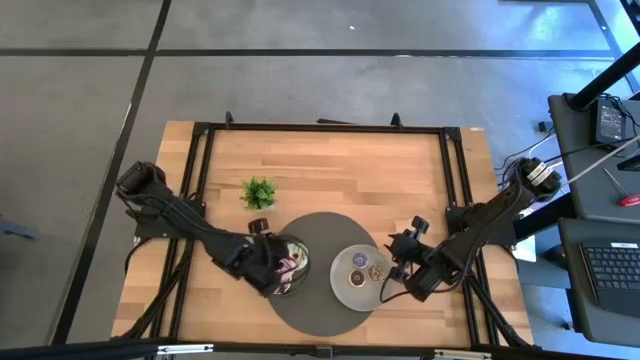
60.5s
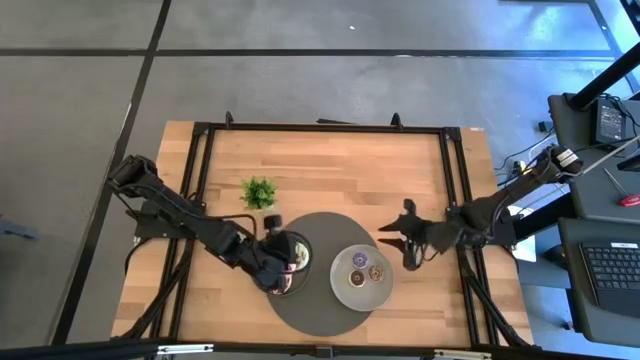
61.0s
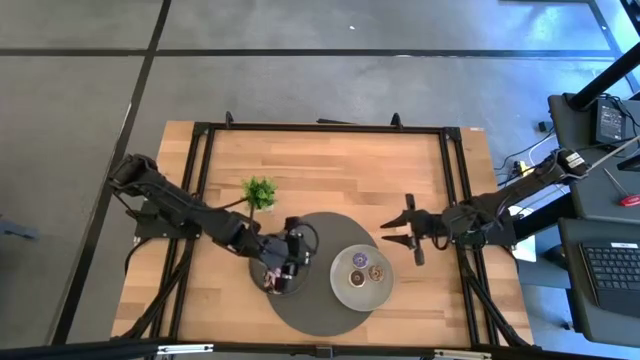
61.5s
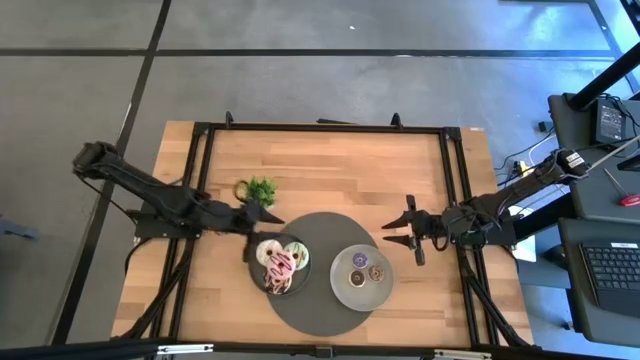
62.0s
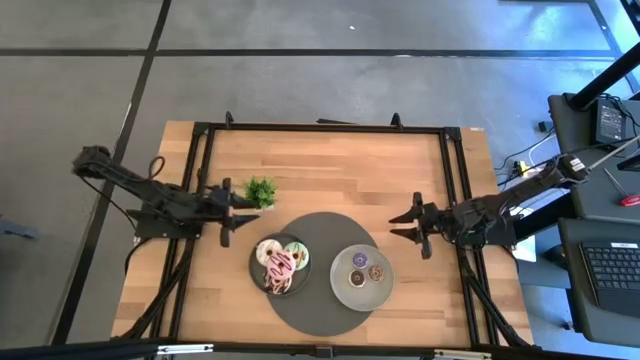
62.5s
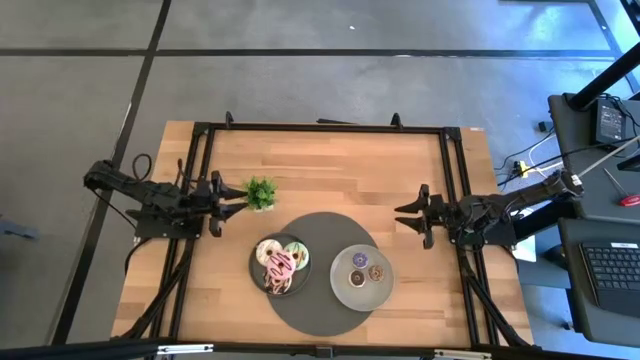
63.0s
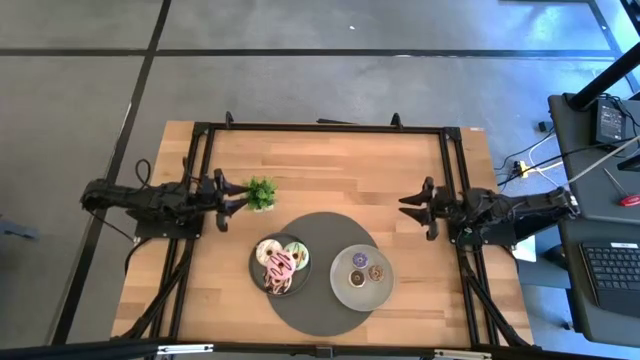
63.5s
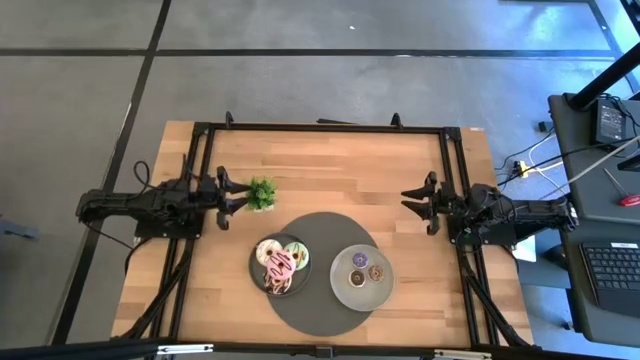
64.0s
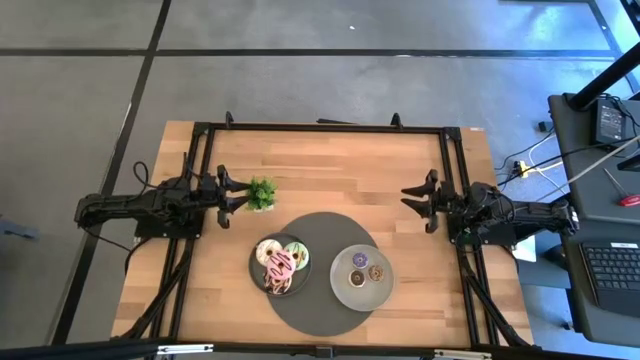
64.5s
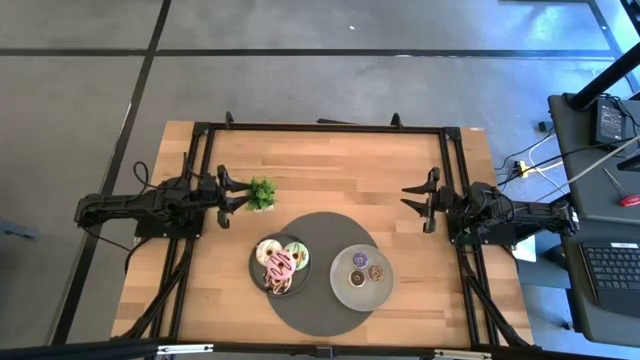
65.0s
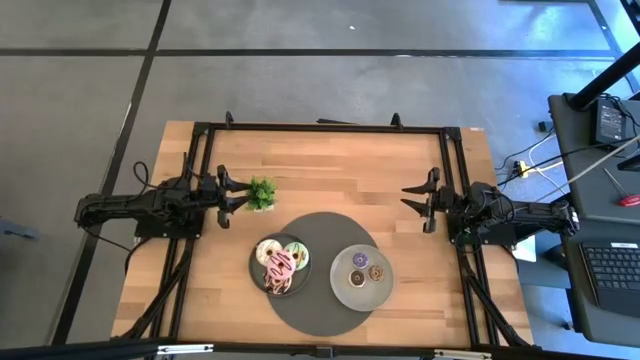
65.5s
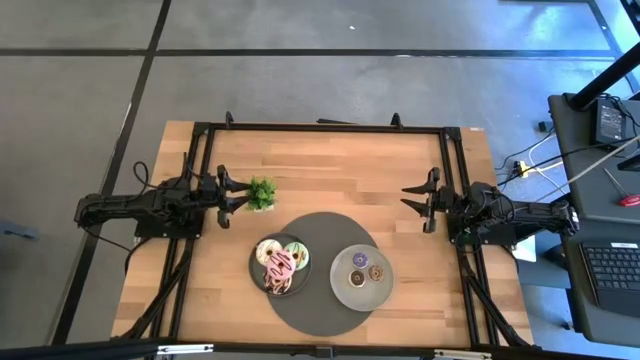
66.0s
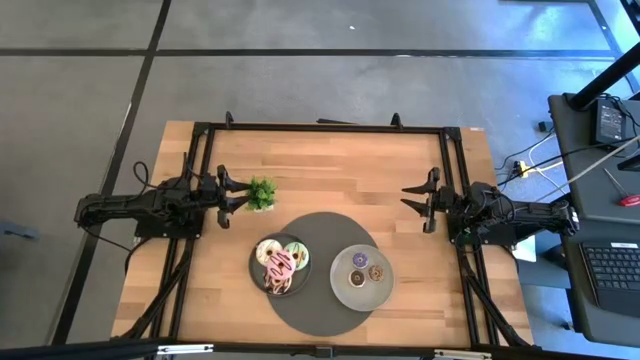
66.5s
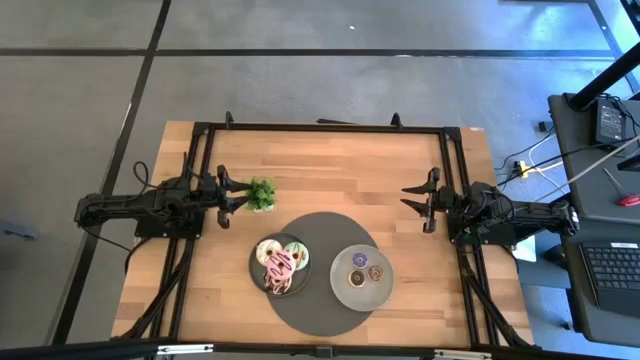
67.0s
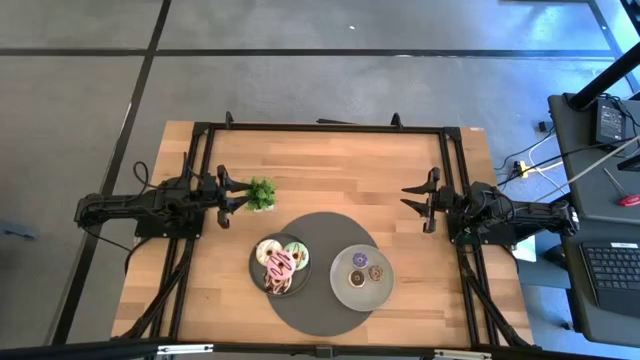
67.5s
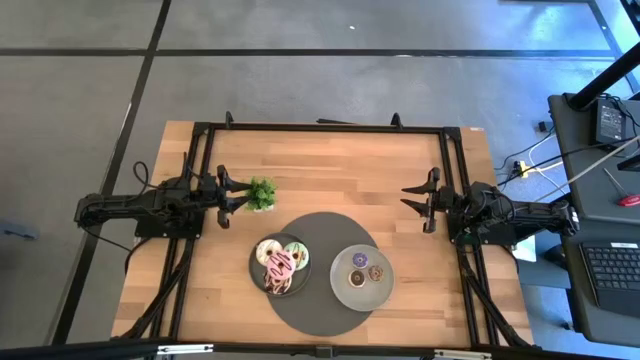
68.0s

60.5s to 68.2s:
Task: Pick & Place donuts
Return to Home Position

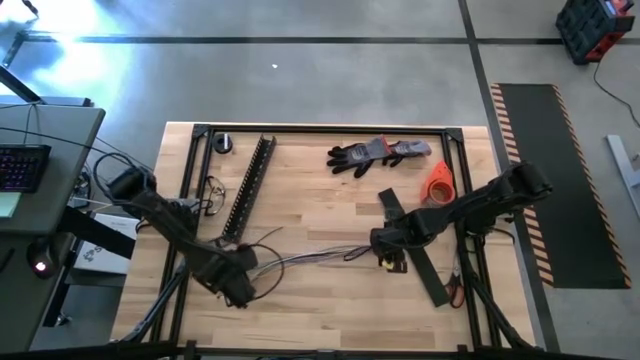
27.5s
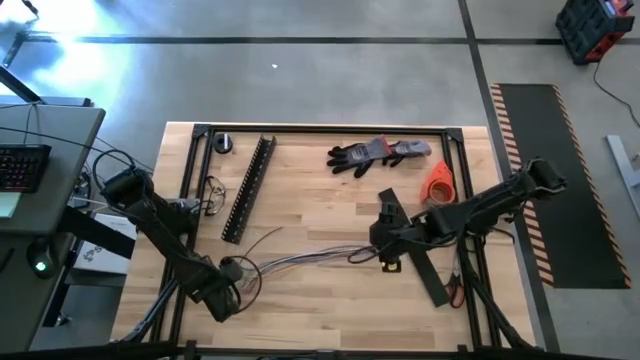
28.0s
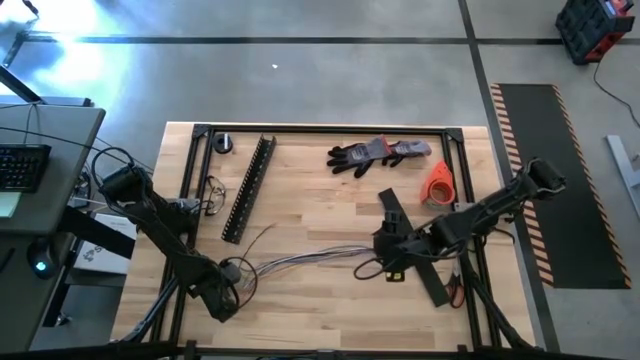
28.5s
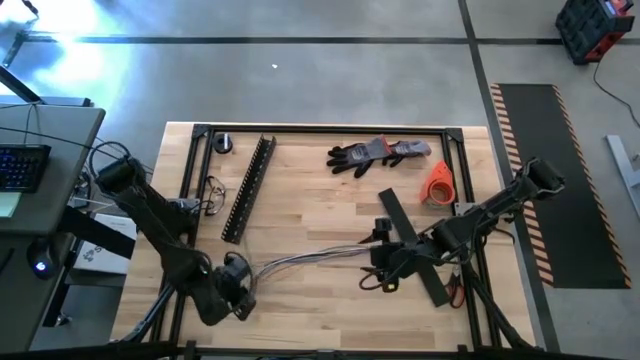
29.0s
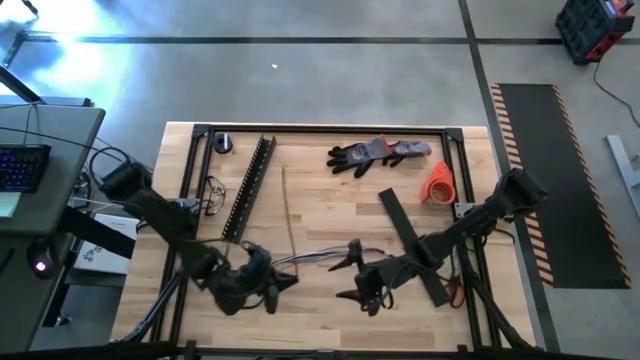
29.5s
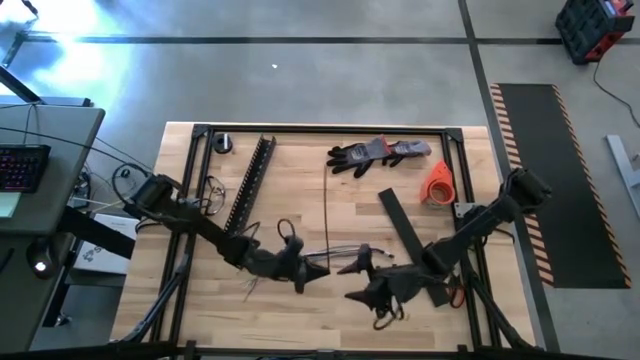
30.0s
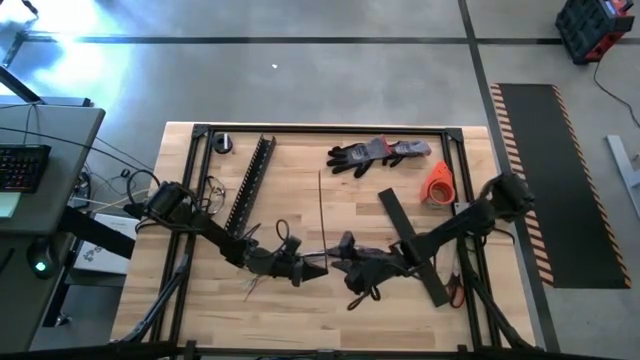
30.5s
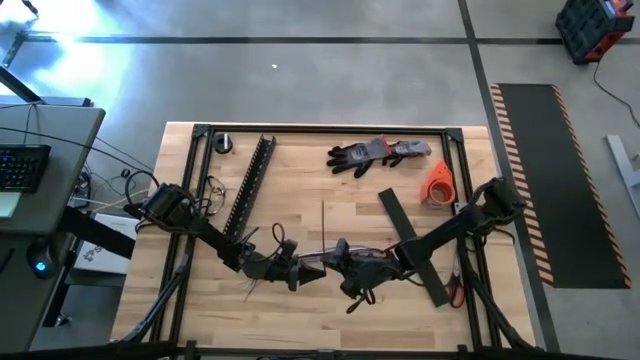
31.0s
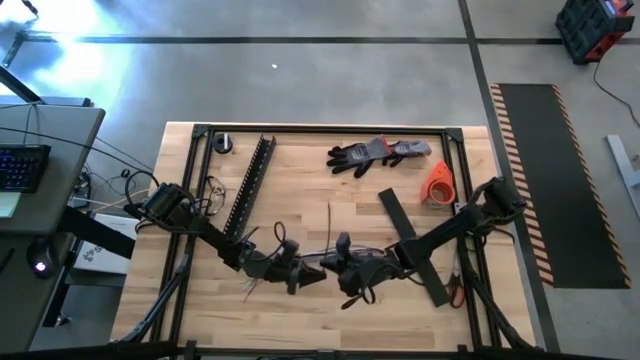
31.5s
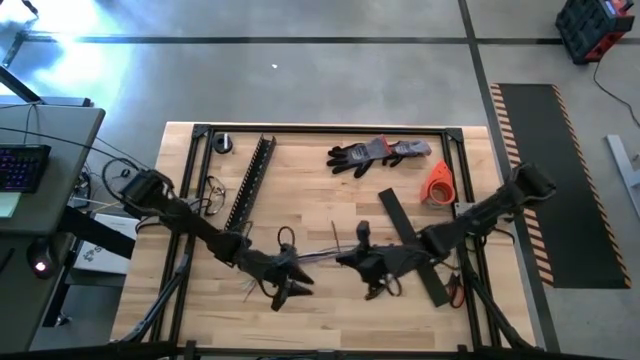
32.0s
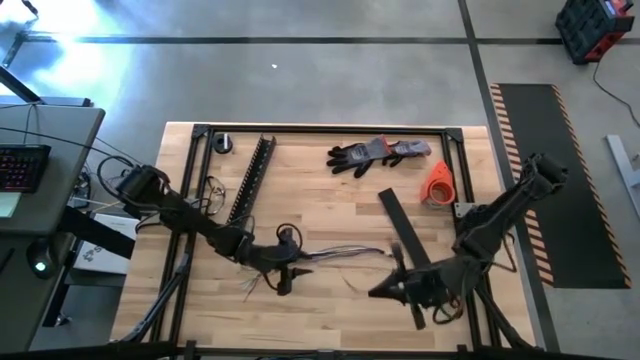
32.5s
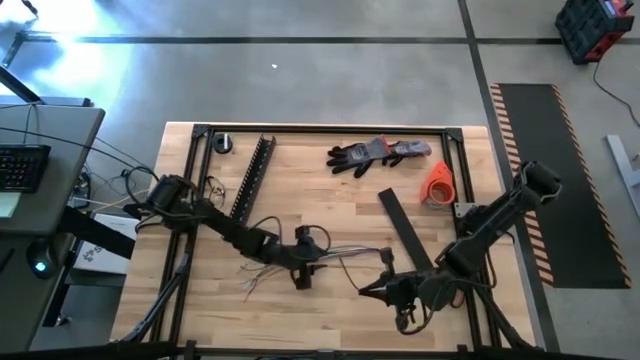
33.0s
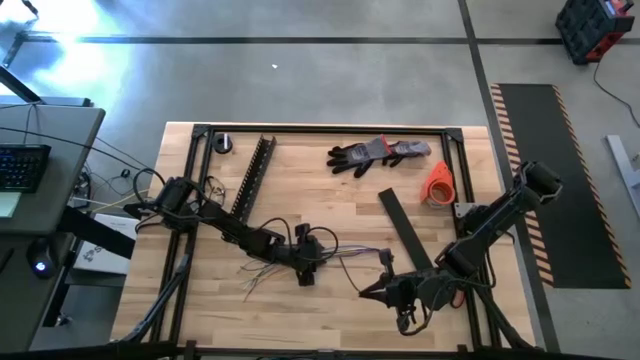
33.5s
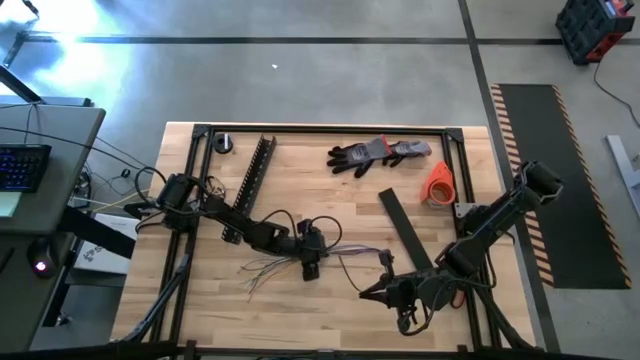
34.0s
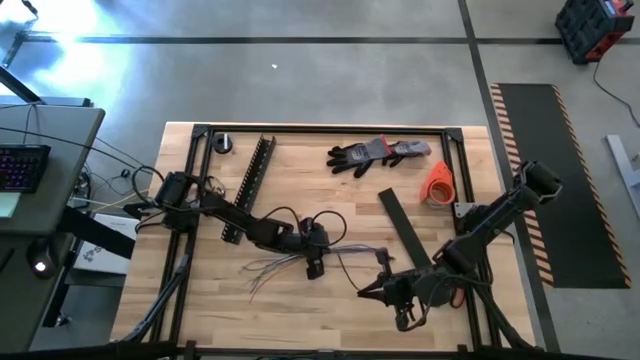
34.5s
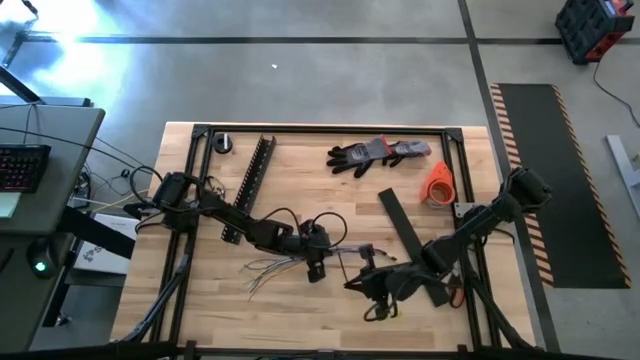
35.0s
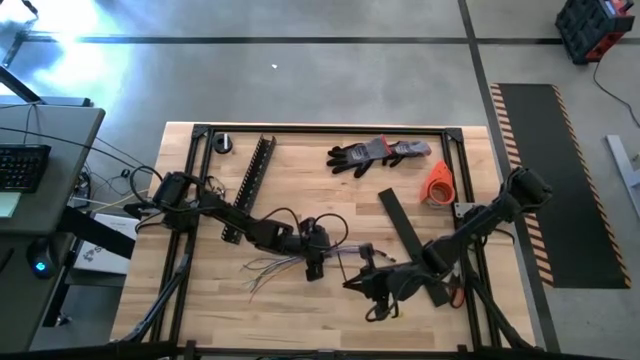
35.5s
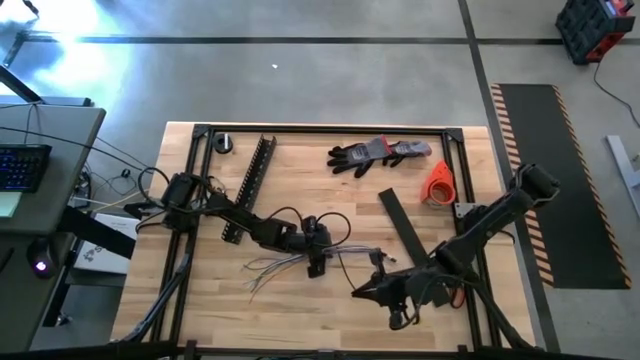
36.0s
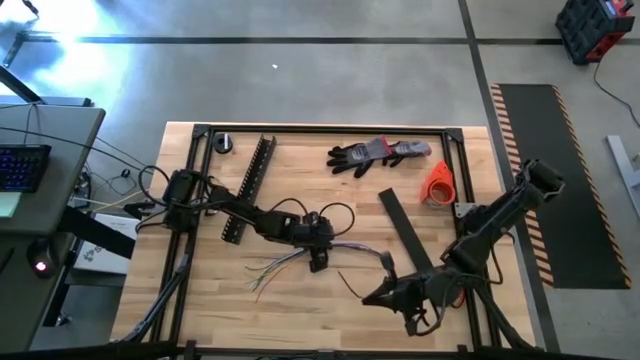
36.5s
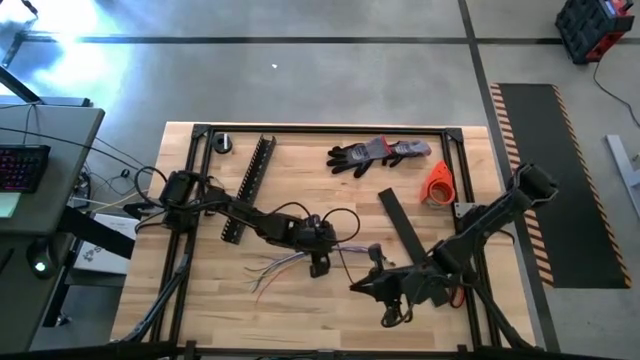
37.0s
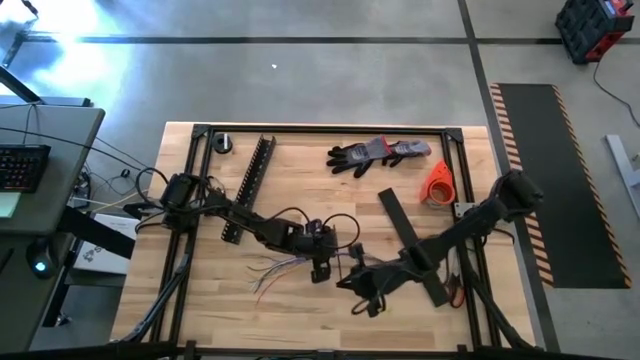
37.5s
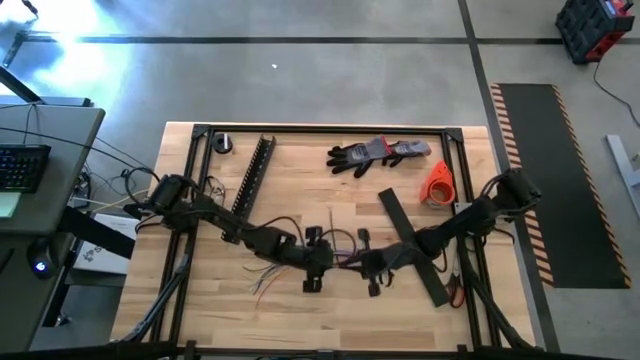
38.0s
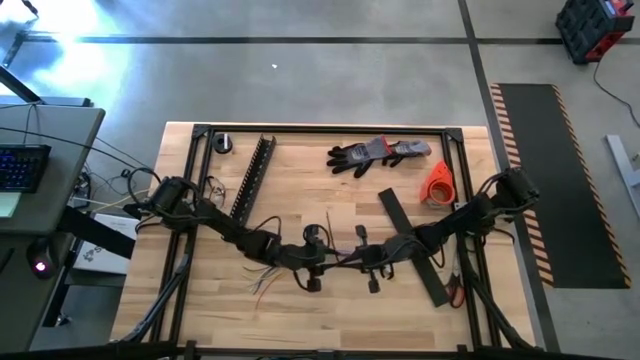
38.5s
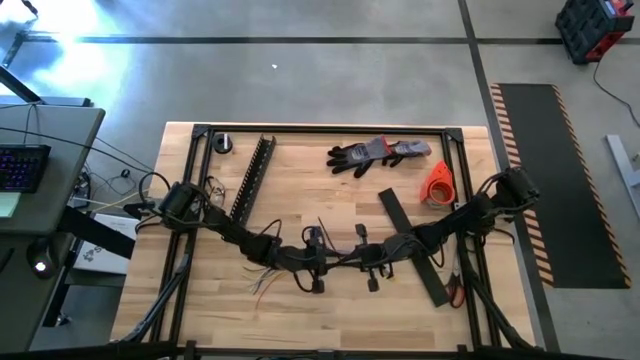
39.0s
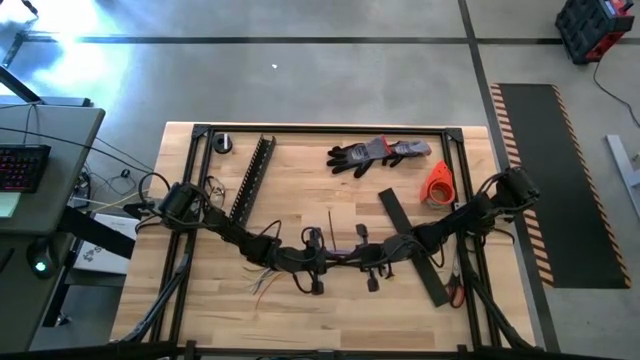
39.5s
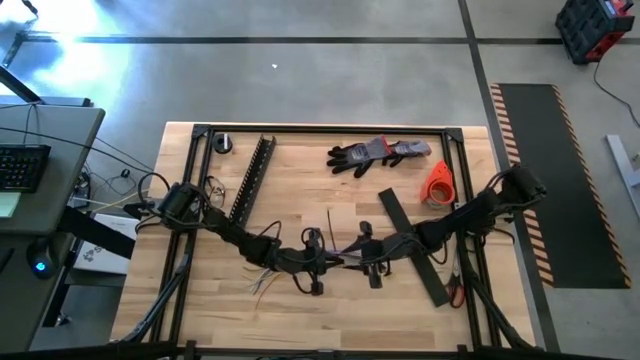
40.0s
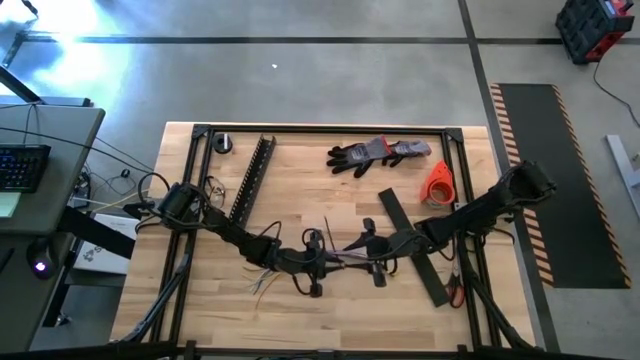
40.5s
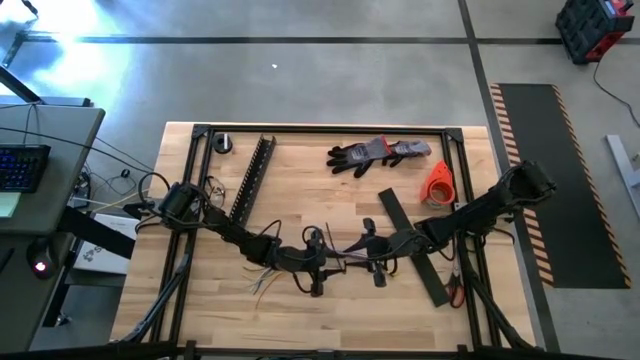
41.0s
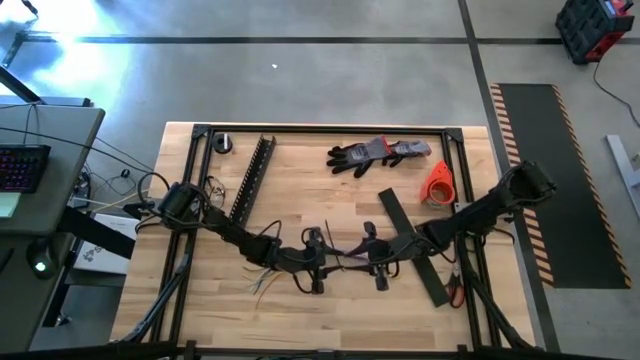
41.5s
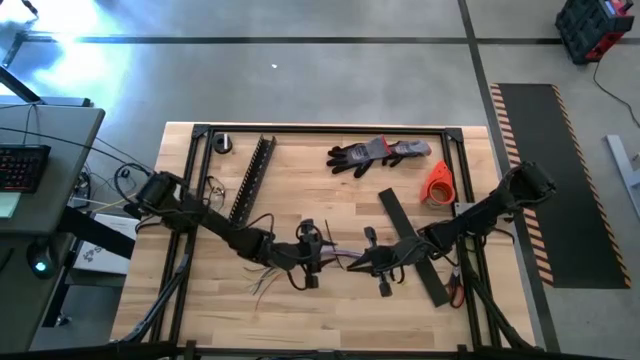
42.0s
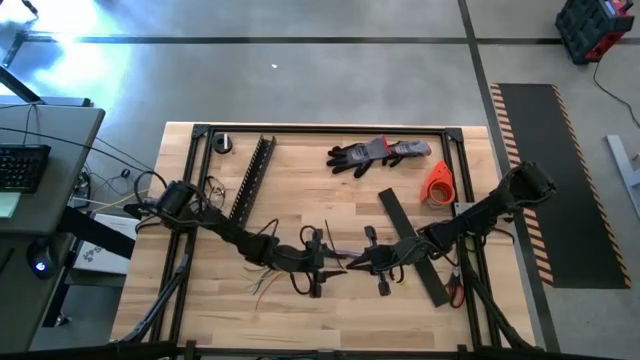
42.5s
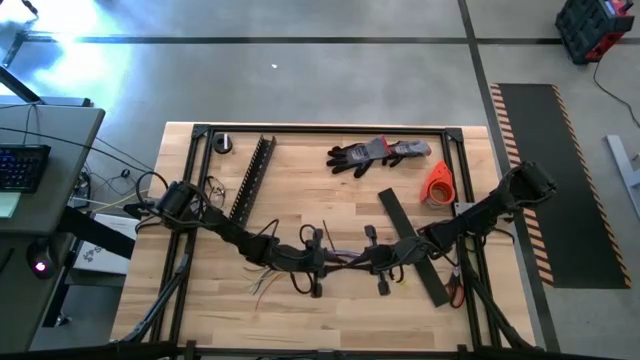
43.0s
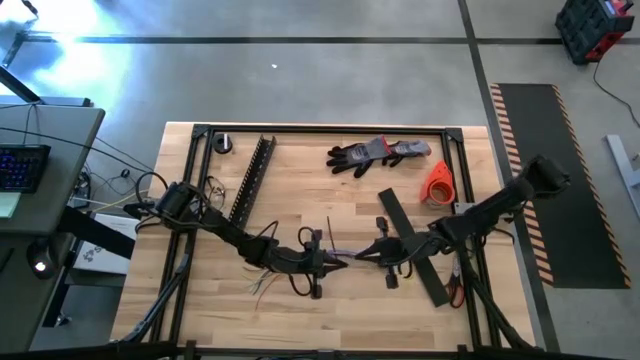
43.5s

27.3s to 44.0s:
Task: Ziptie cables
Wrap the cables wires with the black zip tie
